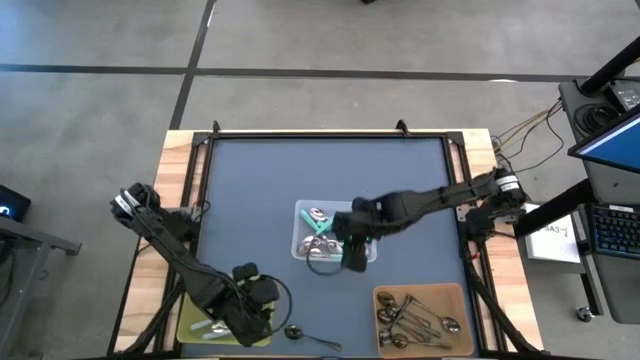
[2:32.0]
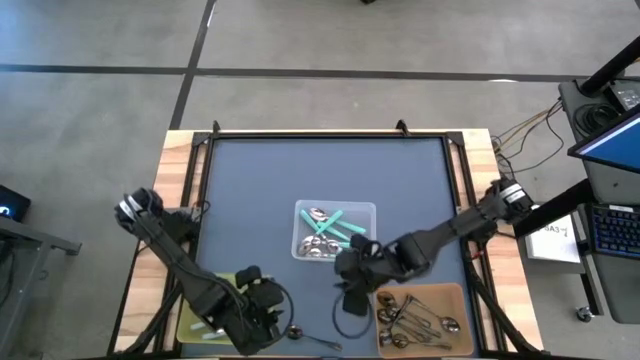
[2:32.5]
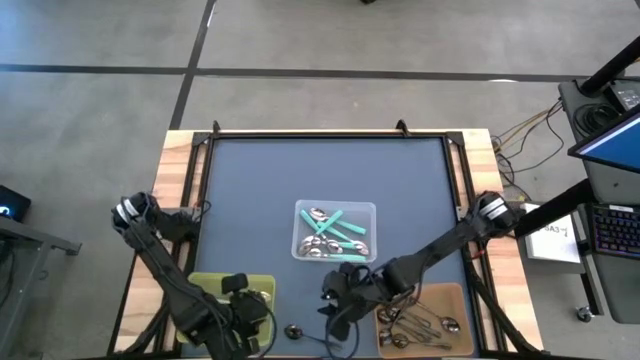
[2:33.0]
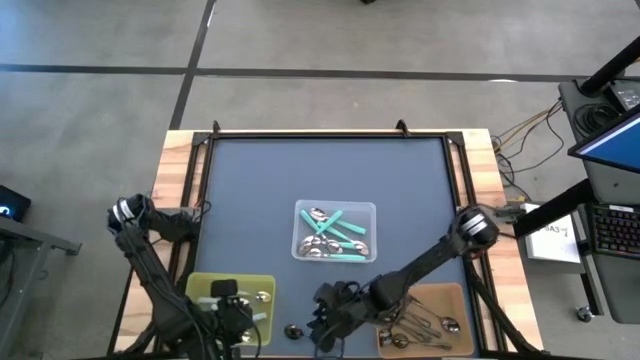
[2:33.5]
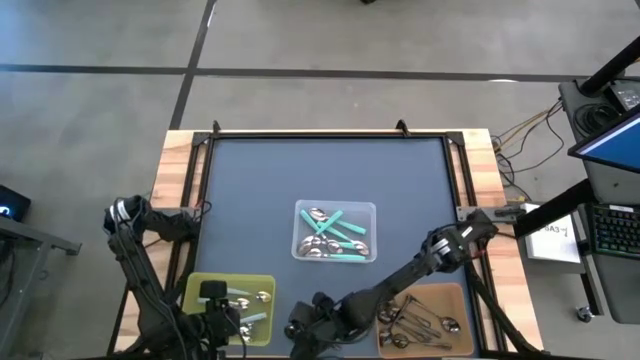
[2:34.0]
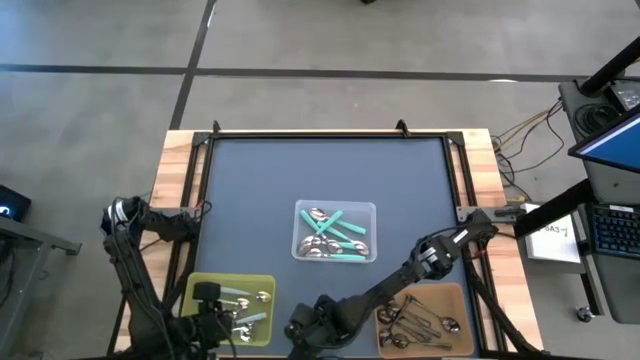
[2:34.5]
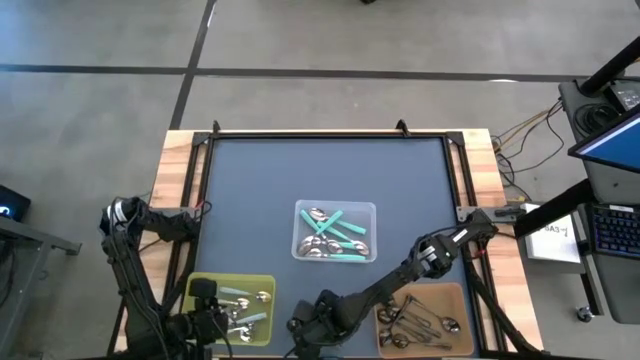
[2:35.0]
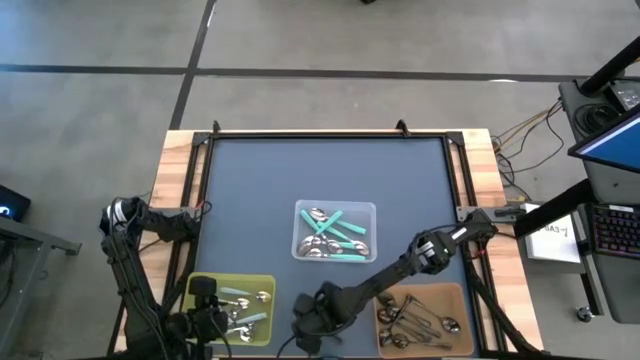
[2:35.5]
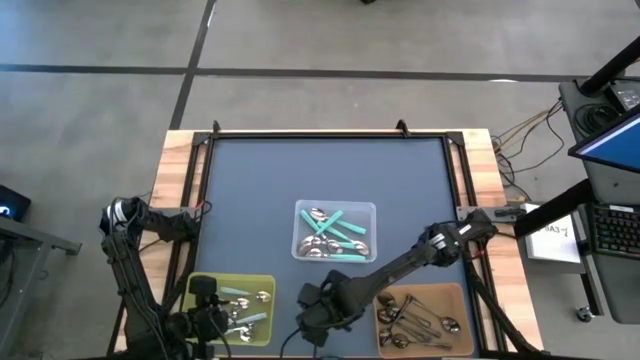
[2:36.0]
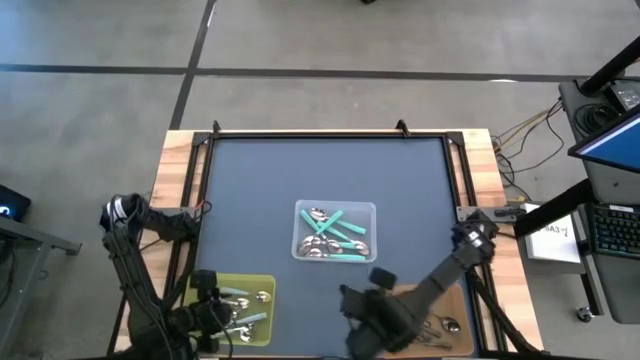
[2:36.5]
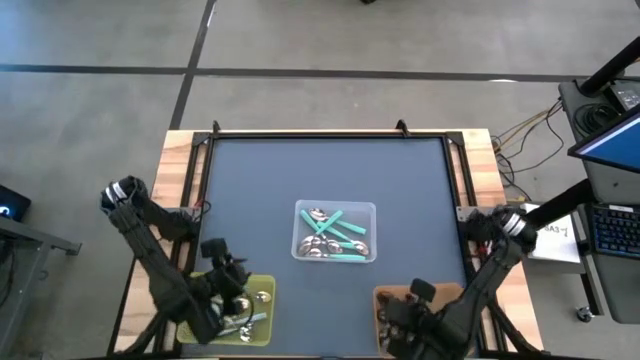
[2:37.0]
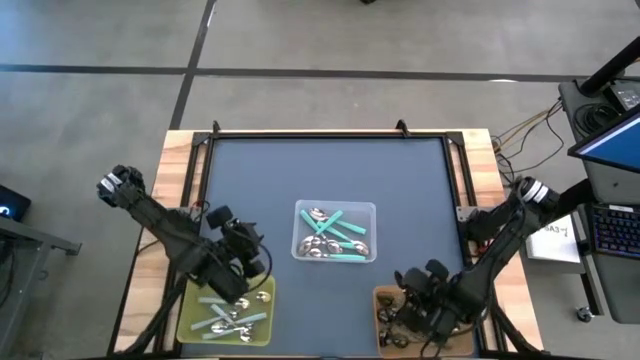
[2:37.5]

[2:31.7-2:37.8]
Task: Sort silverware by color (type)
Put the black spoon into the orange bin

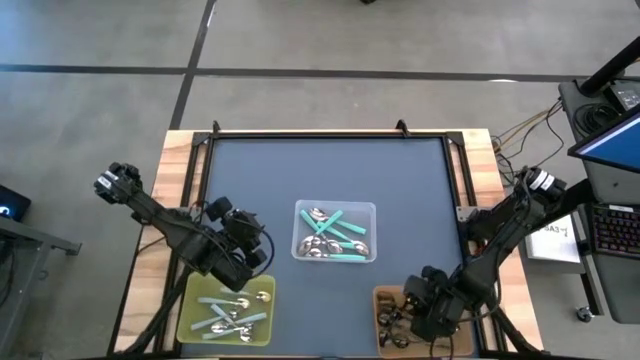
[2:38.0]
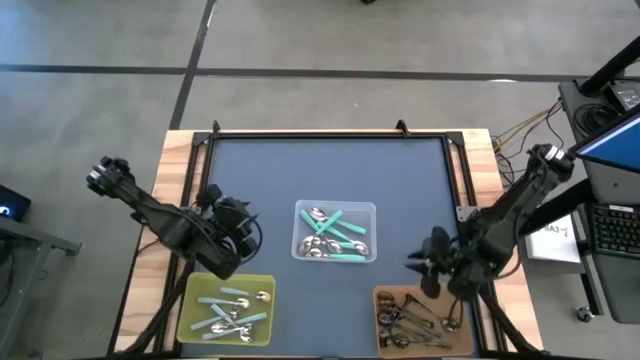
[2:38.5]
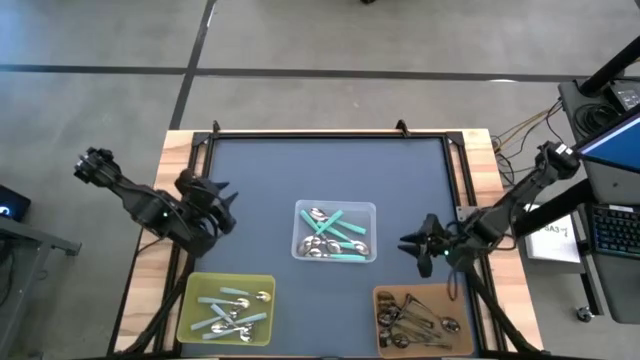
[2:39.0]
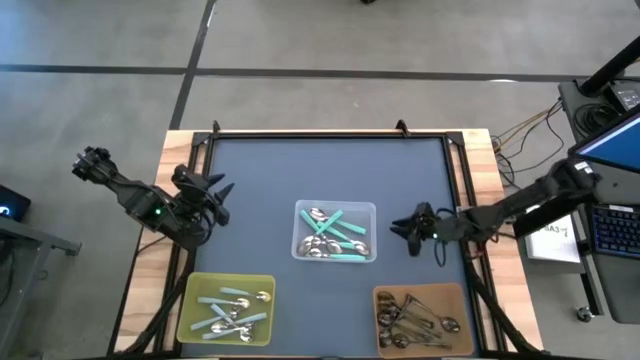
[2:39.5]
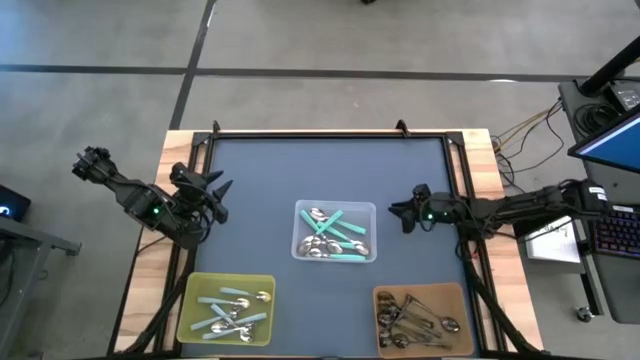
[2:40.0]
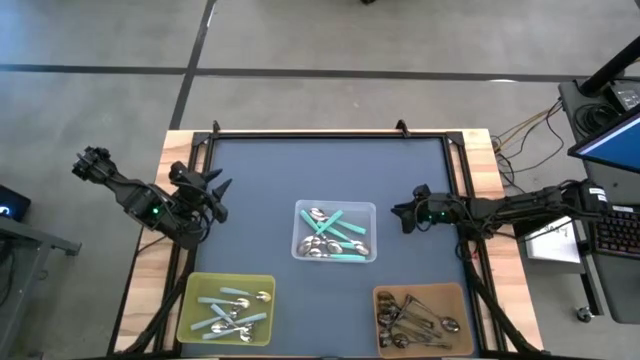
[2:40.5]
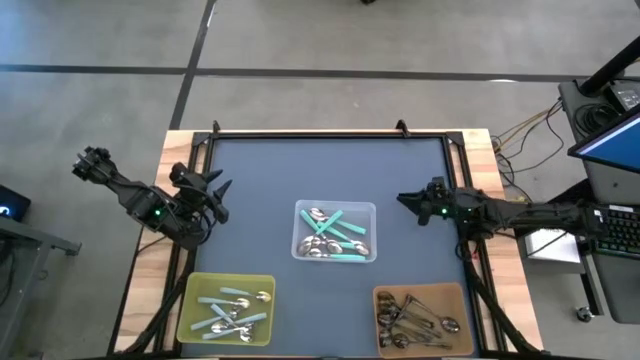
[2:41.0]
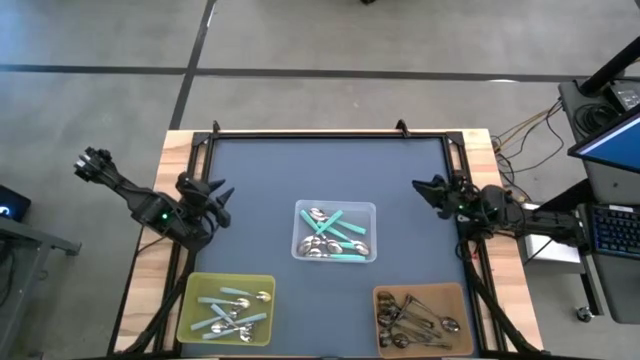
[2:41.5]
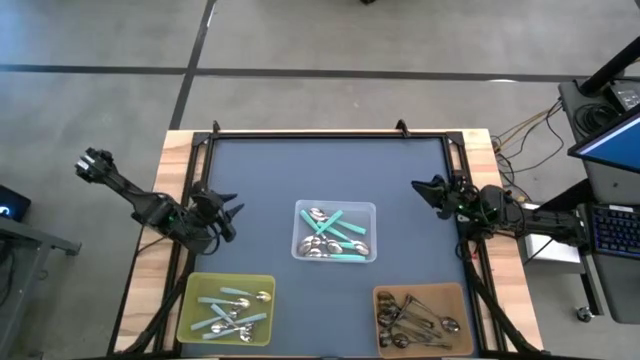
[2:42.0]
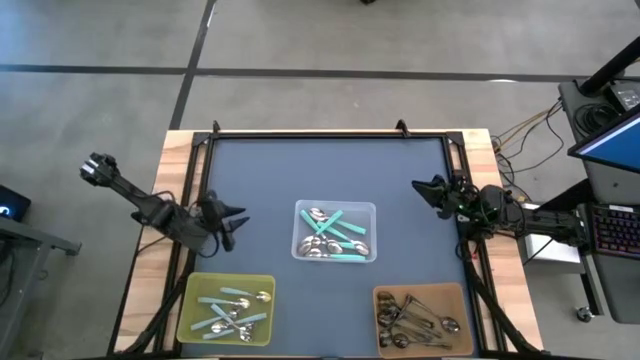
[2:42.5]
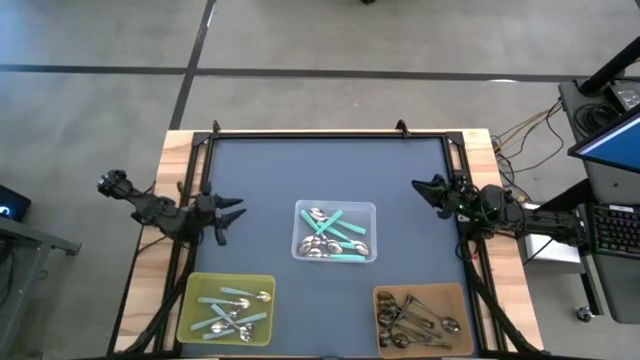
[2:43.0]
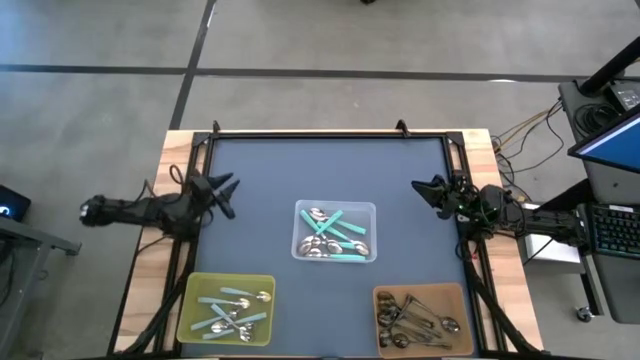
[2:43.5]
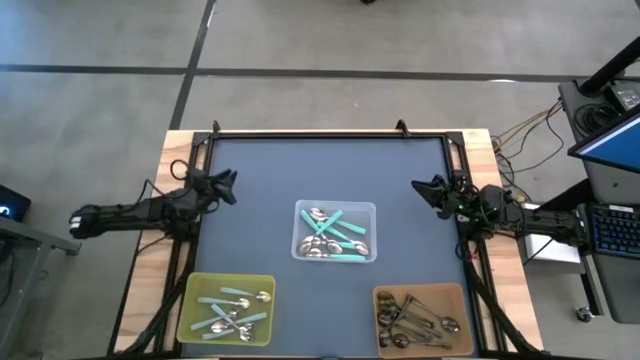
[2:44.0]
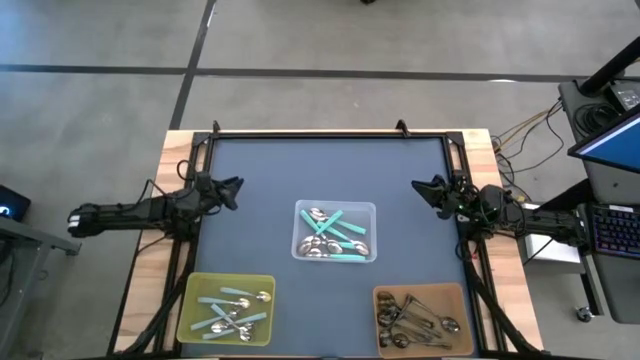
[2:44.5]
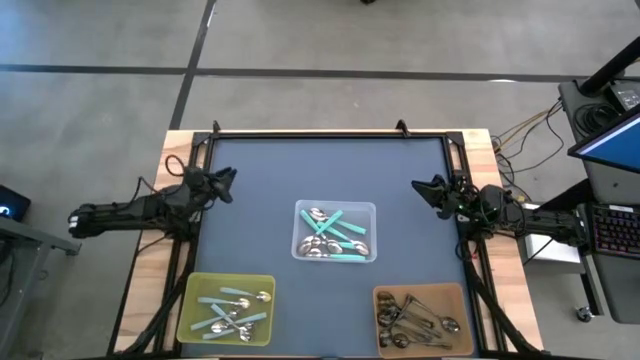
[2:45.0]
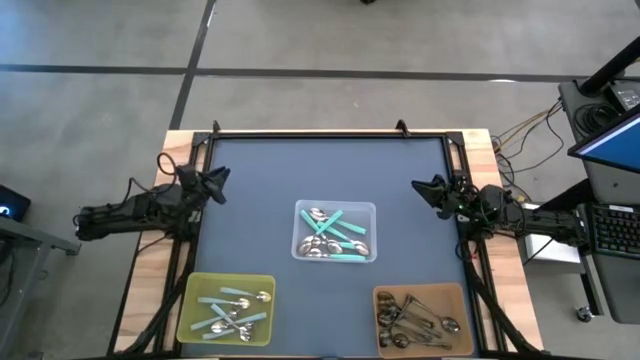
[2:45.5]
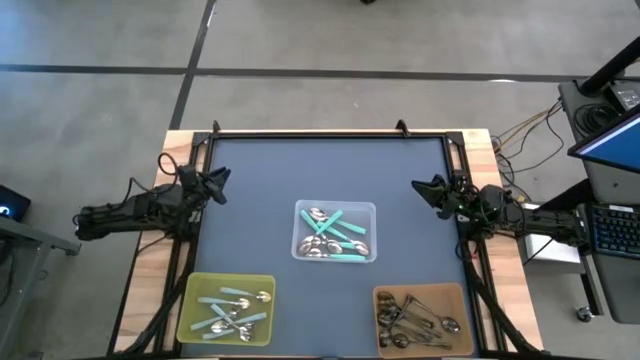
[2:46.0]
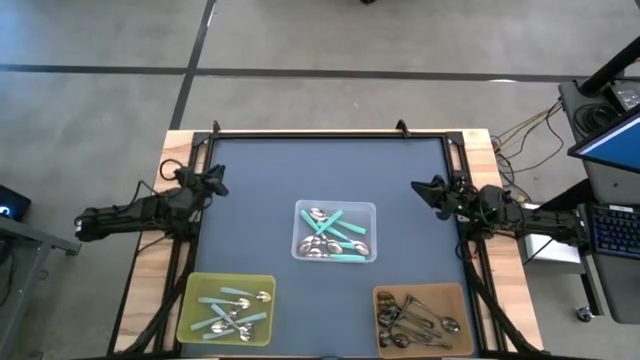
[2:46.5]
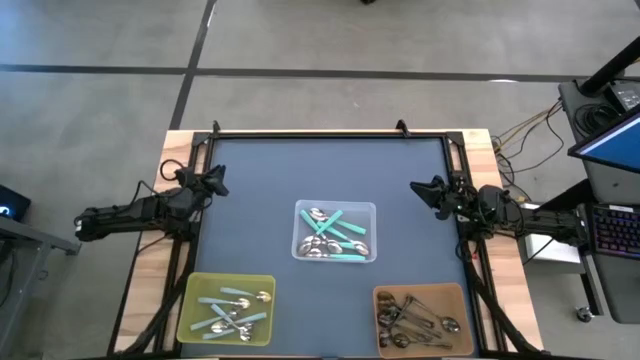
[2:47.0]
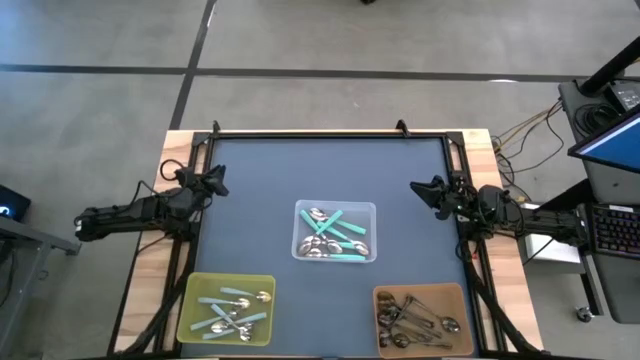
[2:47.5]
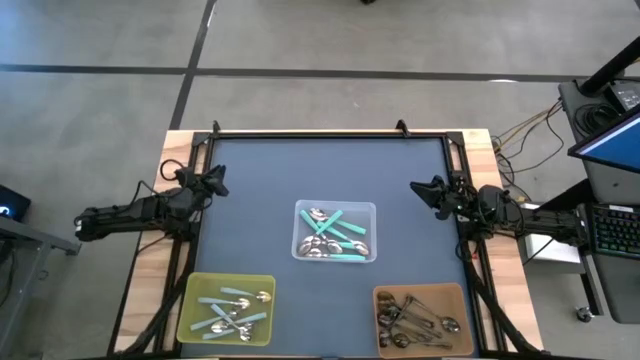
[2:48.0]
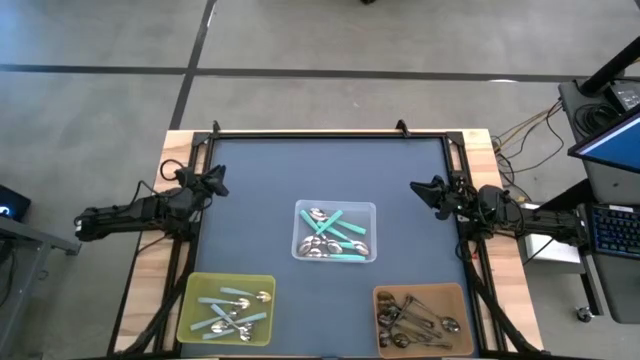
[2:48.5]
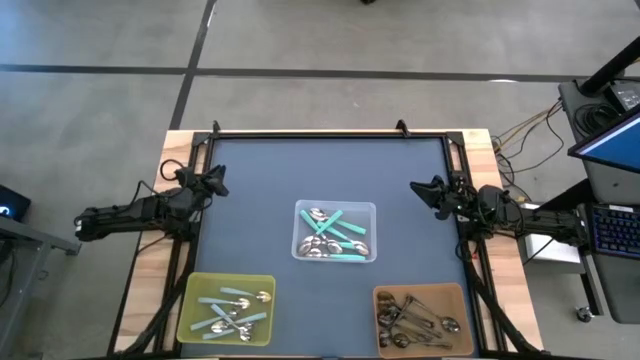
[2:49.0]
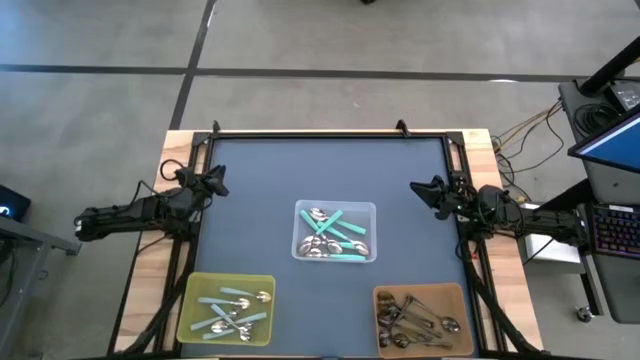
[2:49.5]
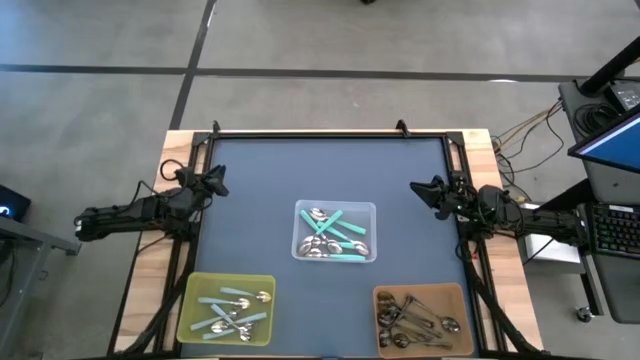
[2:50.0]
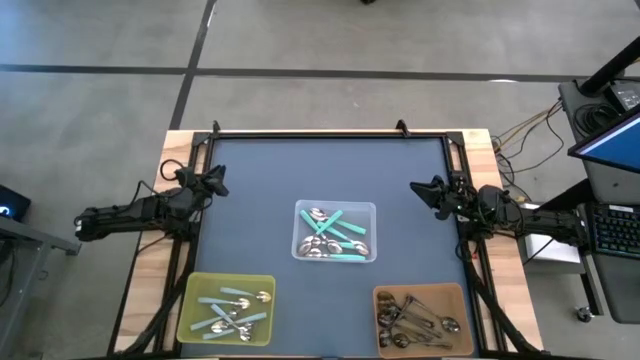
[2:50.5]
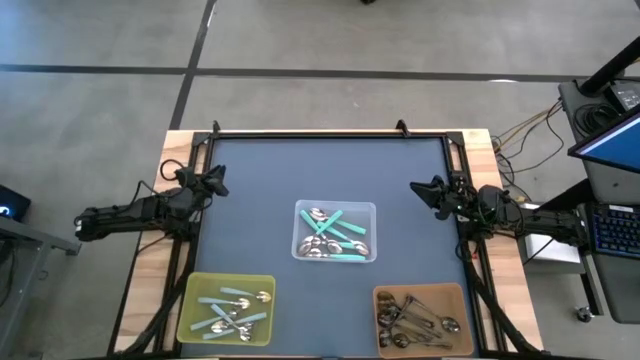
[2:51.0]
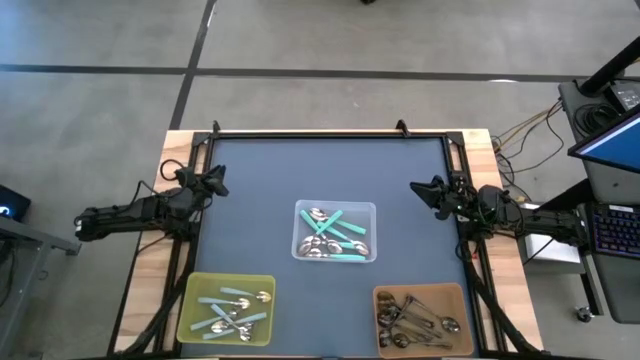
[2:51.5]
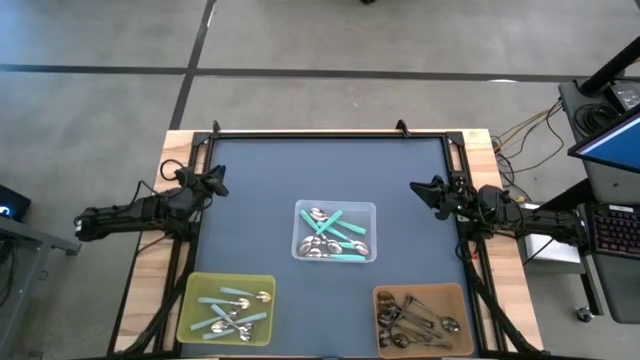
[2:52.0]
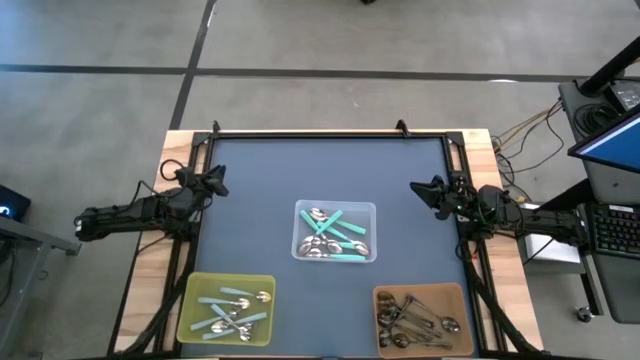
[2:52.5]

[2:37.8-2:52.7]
Return to Home Position
